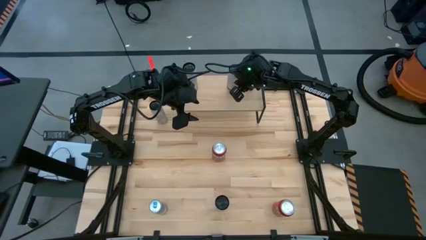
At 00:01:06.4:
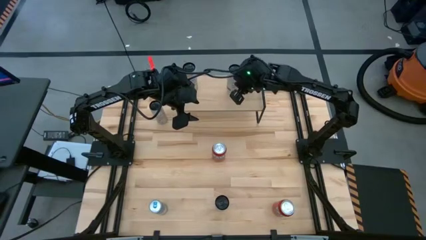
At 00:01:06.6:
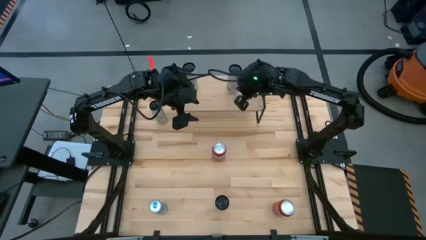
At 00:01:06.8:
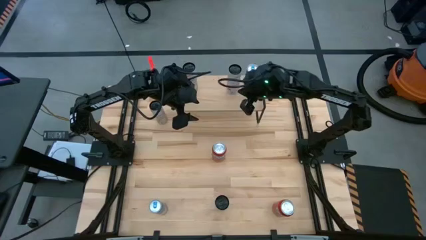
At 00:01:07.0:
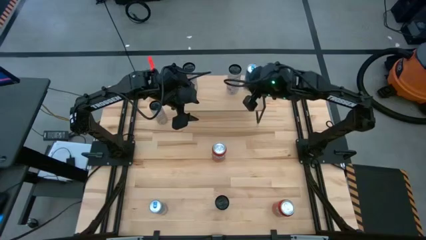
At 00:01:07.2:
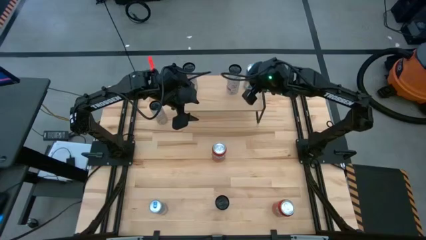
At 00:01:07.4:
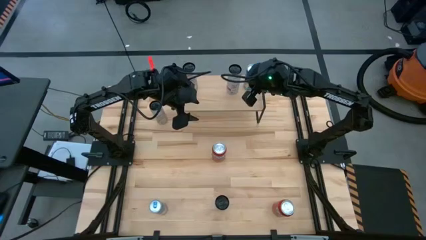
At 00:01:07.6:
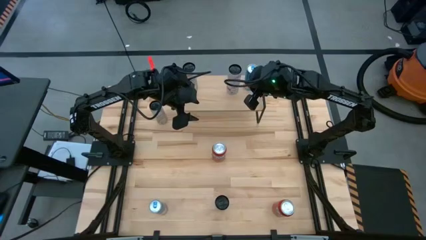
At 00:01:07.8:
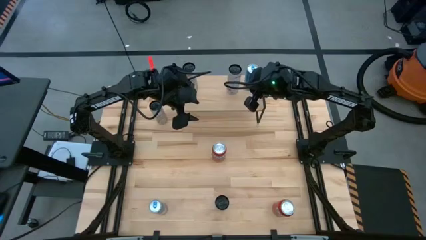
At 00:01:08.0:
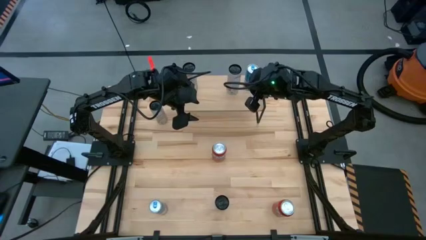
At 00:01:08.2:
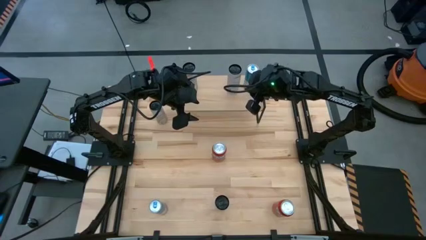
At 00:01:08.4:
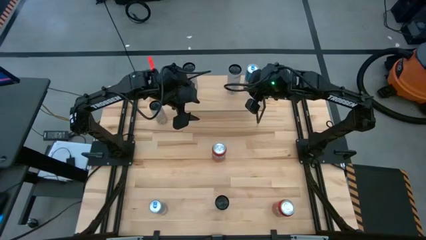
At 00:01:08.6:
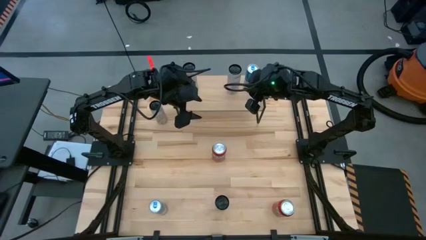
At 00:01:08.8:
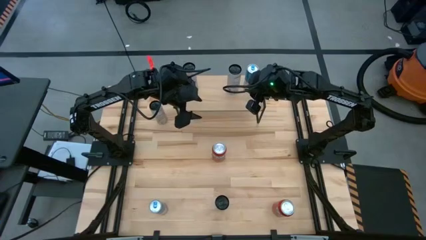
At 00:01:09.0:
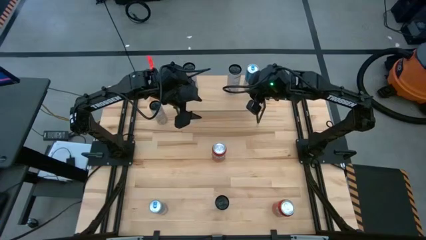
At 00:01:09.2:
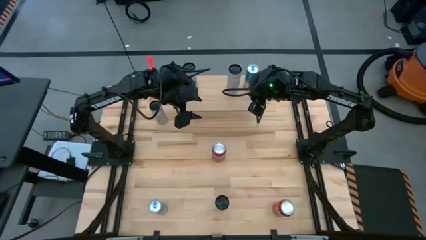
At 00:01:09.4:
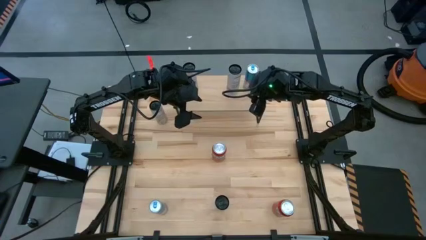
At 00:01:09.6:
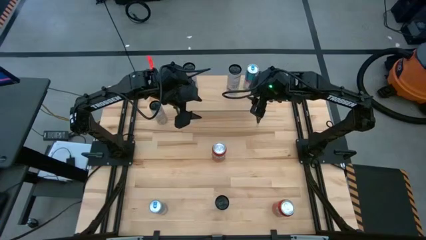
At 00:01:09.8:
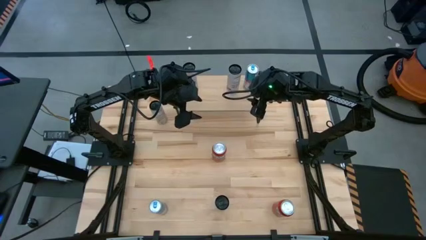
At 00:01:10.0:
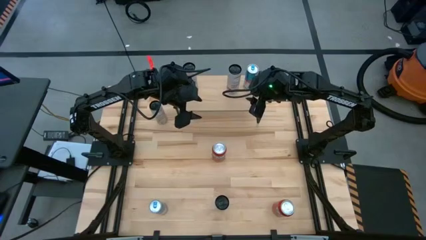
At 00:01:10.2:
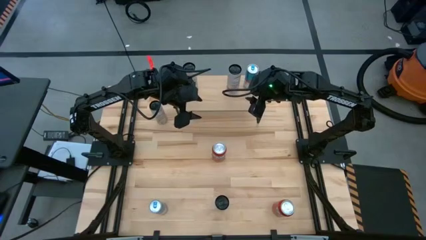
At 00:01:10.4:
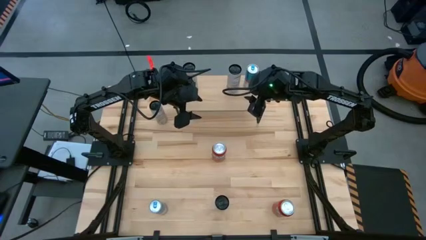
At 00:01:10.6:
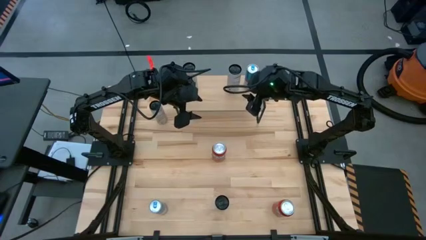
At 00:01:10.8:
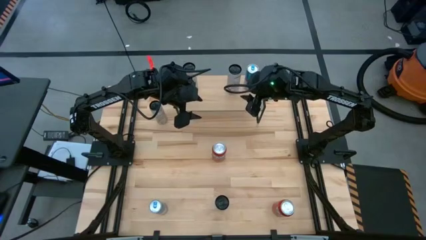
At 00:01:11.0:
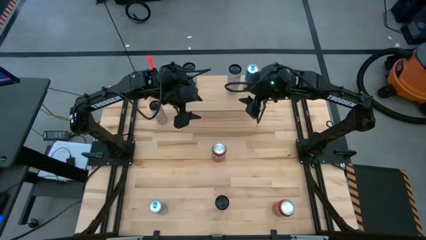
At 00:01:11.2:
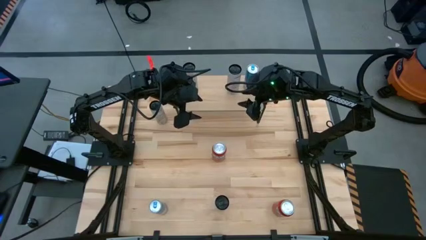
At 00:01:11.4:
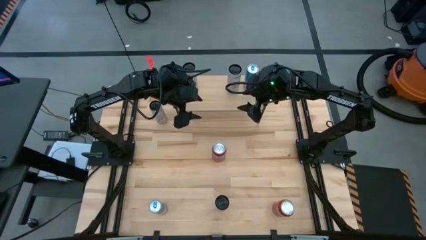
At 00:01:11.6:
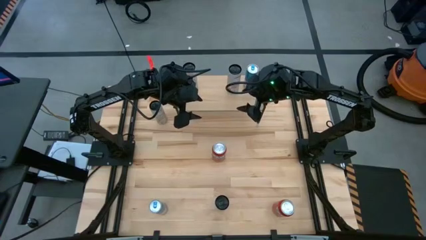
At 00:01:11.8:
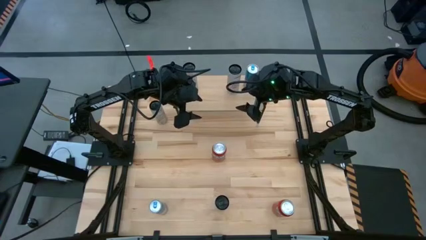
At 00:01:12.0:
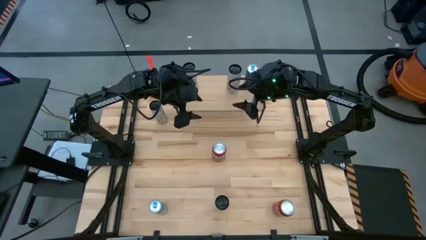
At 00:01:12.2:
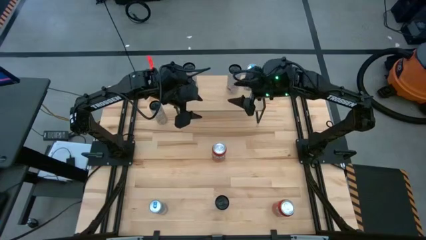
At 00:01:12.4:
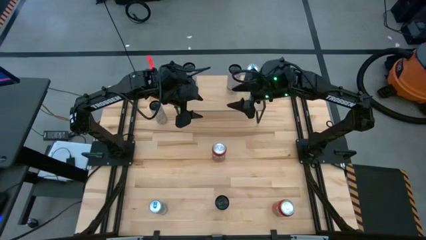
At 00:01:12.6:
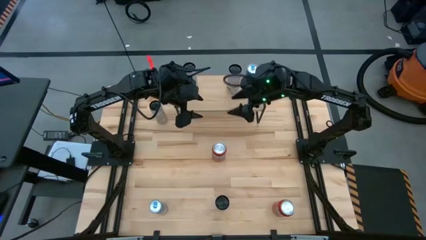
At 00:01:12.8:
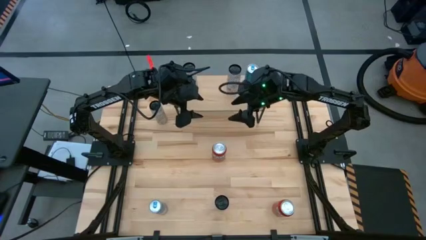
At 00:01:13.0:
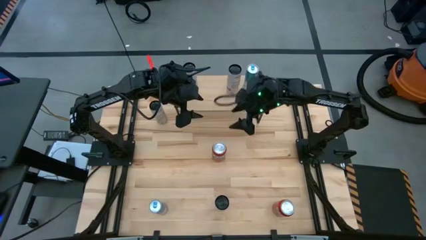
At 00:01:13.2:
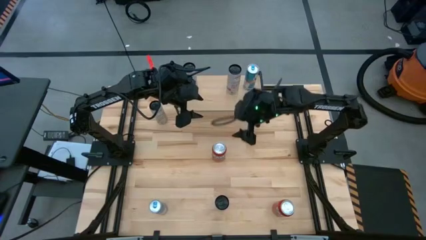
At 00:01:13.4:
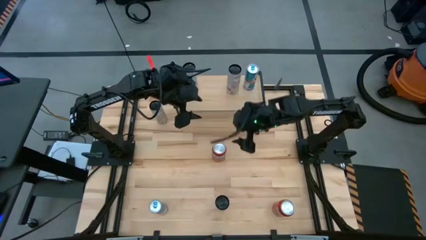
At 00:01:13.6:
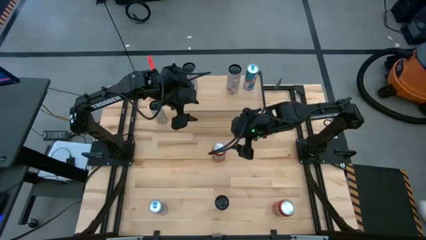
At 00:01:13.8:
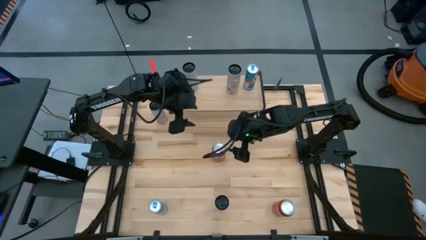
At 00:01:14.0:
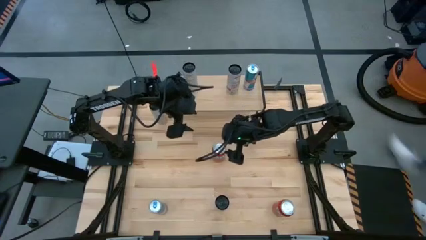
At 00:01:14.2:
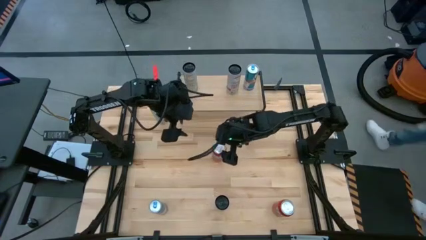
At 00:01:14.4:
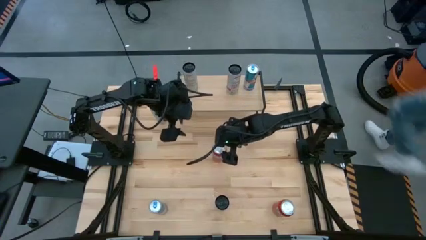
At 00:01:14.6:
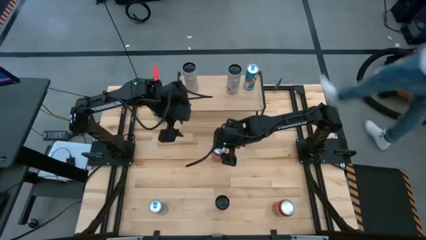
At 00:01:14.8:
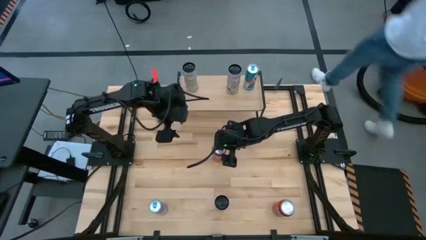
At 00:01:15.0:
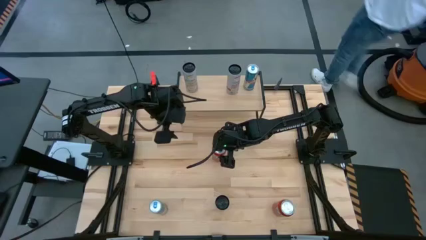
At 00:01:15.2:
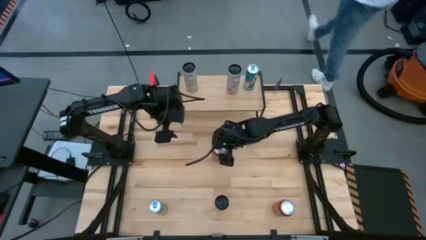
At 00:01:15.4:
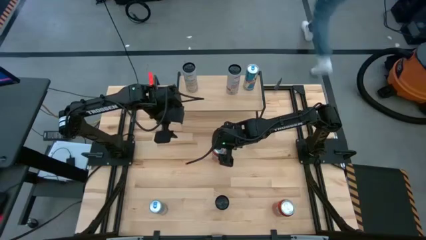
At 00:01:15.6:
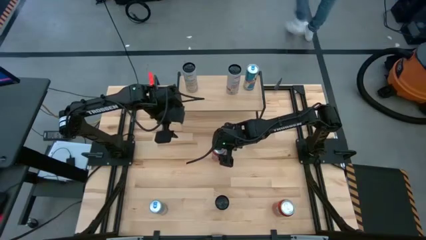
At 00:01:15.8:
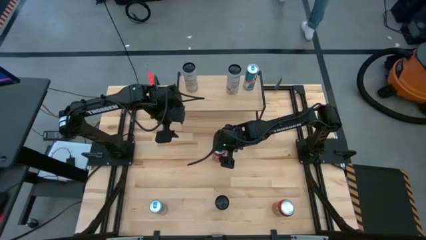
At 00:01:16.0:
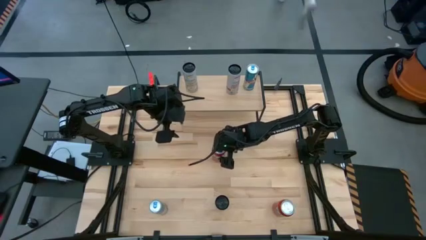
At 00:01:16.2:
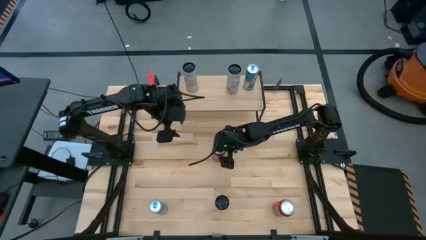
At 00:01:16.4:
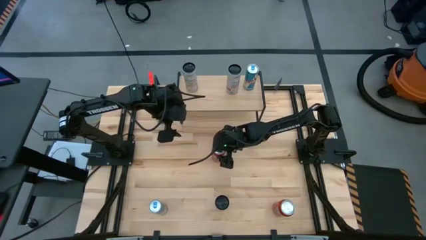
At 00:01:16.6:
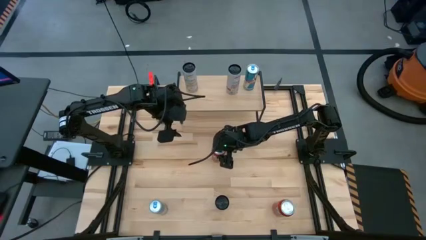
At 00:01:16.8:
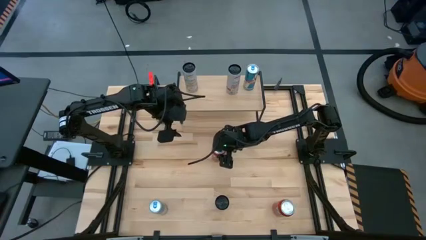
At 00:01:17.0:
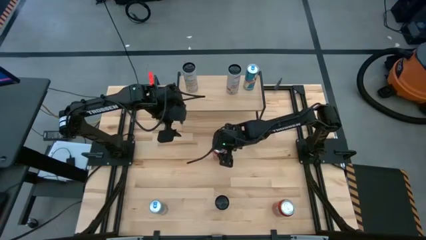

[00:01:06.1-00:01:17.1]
Task: Place canned beverage on shelf
Put the top red soda can on the shelf

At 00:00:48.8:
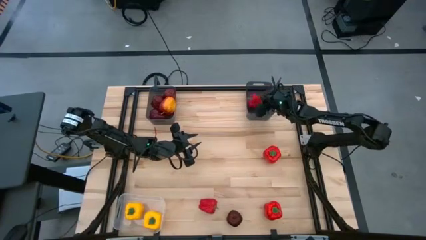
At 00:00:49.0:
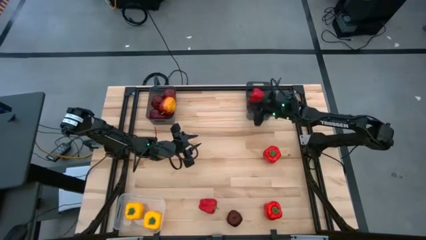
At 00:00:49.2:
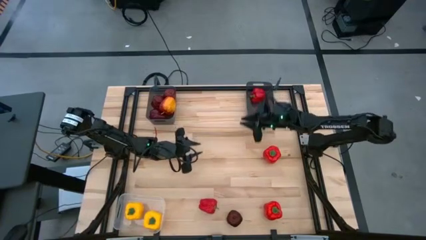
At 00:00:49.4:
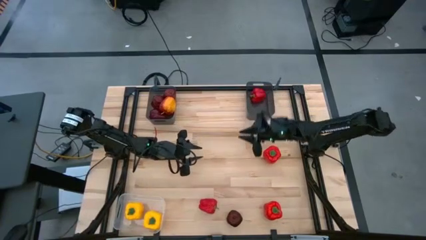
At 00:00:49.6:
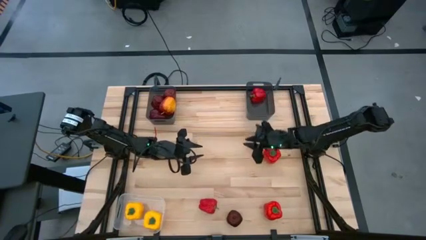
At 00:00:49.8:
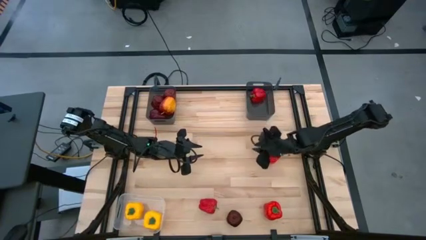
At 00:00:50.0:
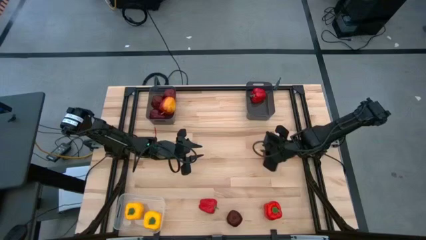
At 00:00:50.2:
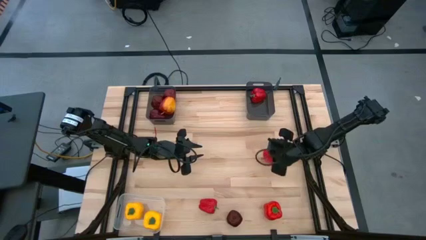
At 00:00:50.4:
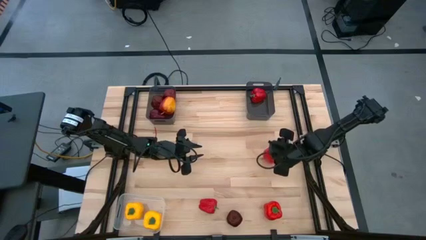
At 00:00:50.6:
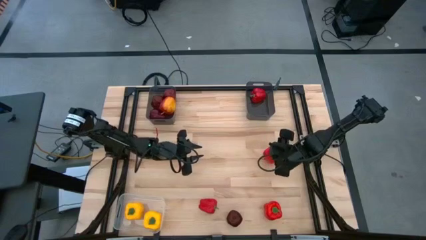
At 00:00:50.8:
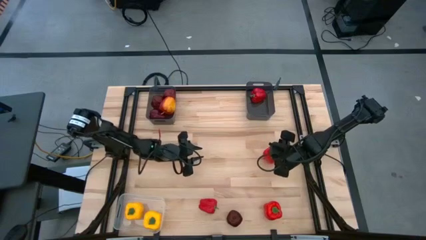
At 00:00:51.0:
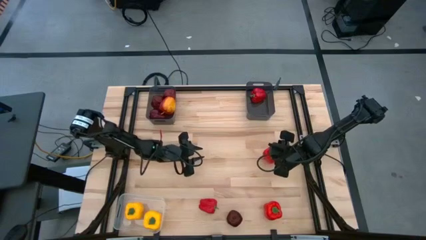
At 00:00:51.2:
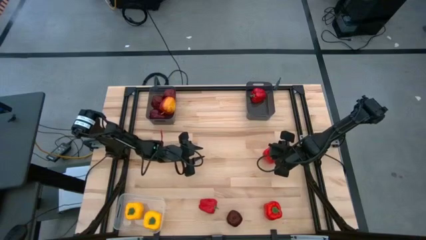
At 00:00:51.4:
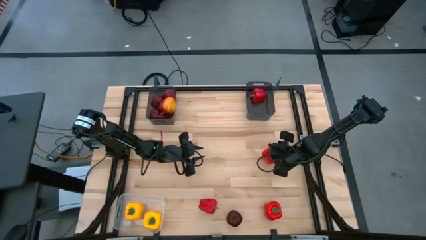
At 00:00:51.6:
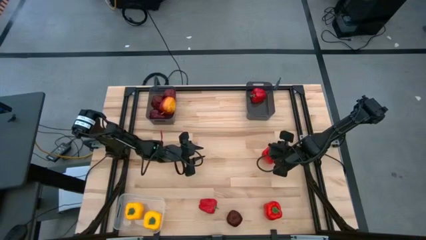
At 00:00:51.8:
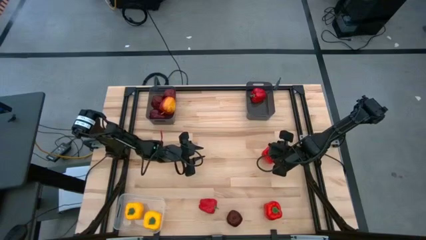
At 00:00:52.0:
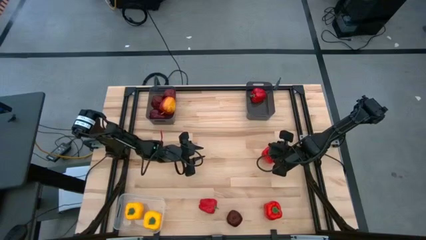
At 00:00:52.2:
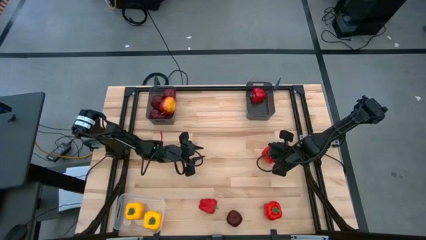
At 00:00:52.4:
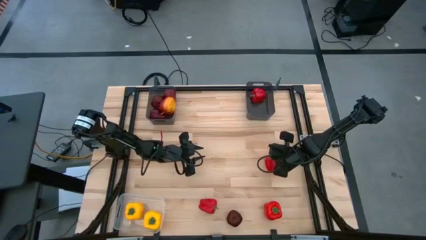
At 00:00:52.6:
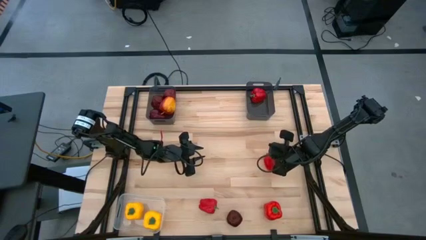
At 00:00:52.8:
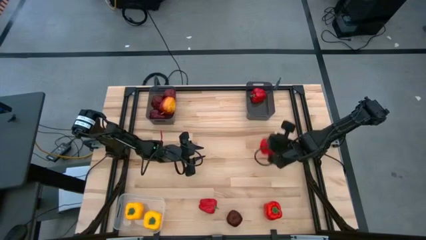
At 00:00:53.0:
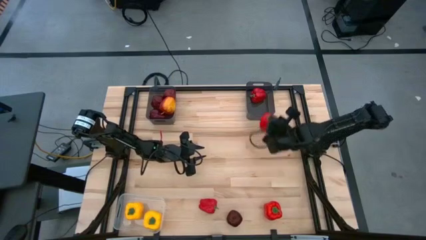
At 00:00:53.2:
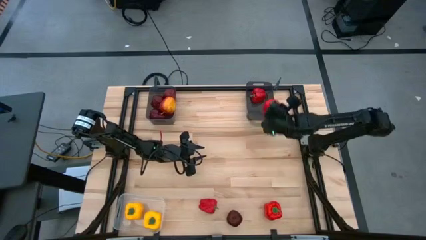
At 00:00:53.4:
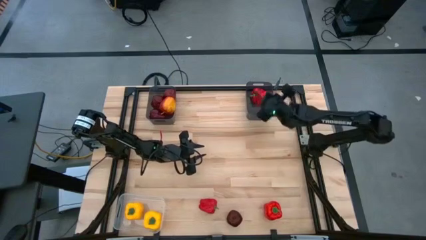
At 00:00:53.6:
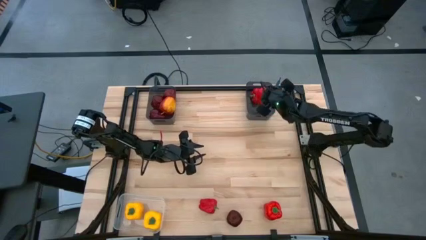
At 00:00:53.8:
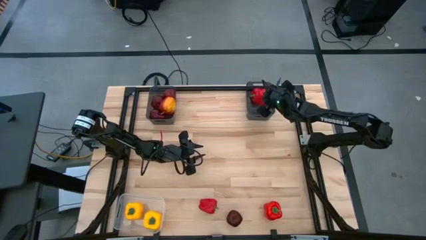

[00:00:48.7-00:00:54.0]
Task: Sort produce into baskets
Put the red bell pepper into the right black bin
